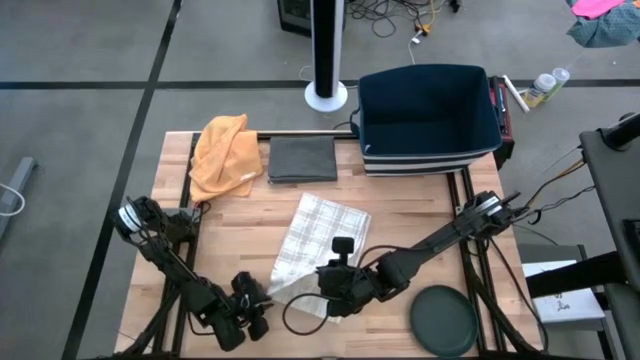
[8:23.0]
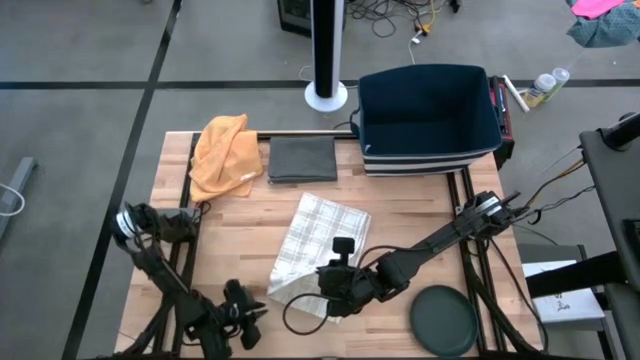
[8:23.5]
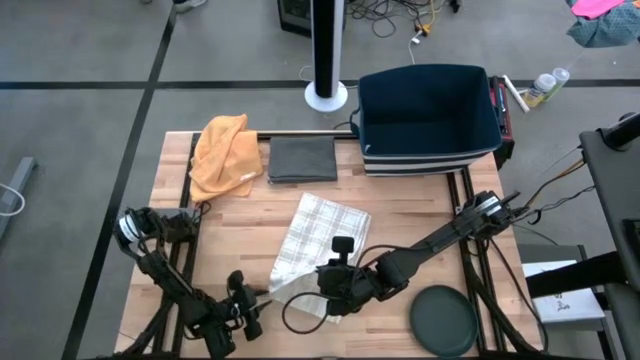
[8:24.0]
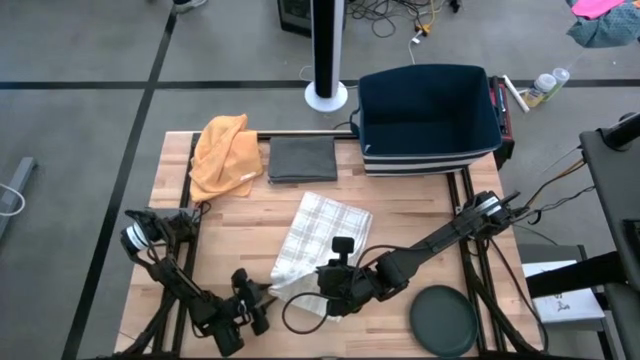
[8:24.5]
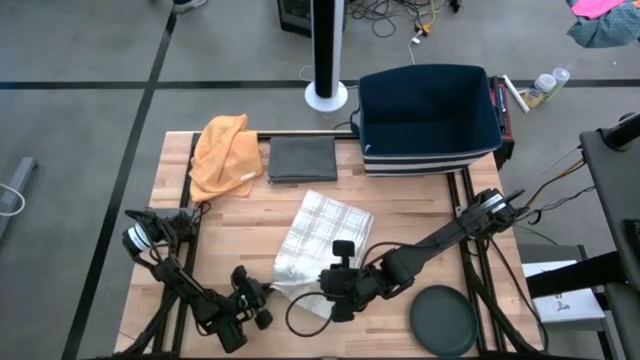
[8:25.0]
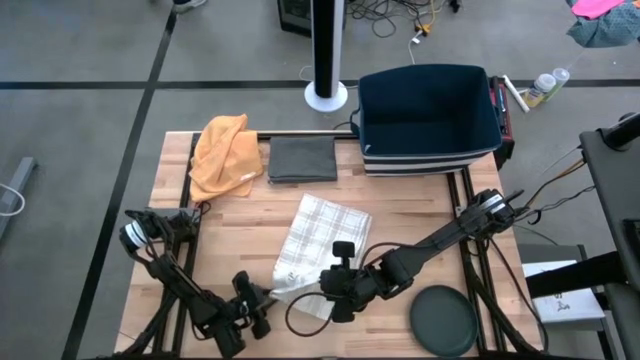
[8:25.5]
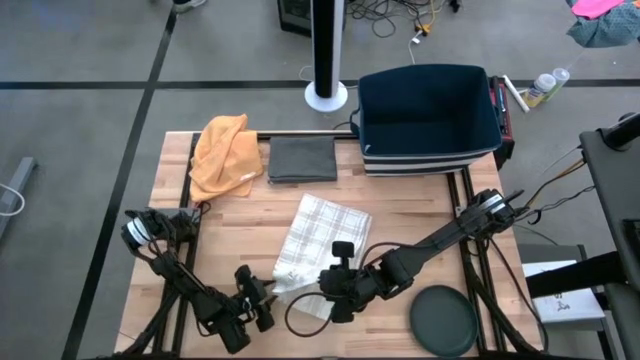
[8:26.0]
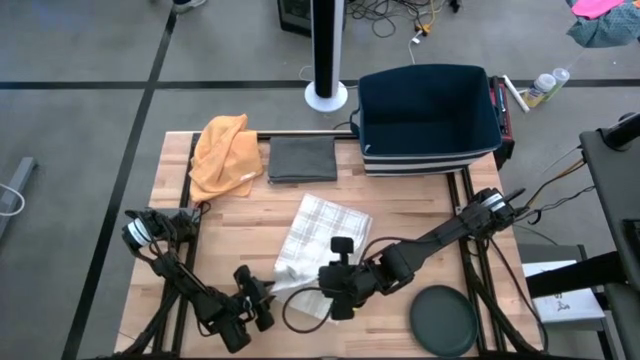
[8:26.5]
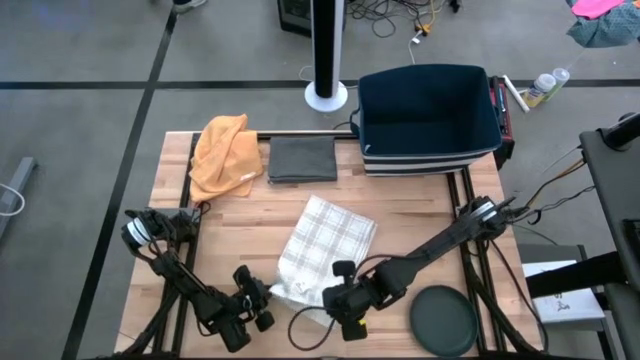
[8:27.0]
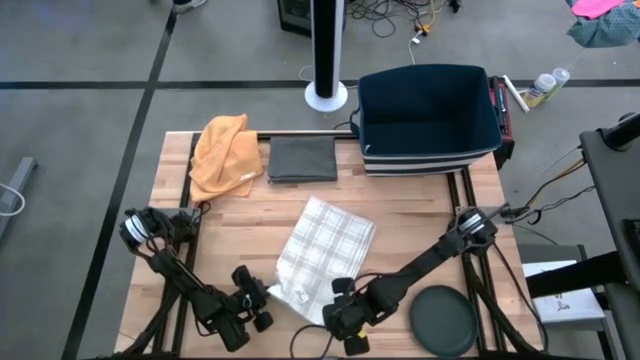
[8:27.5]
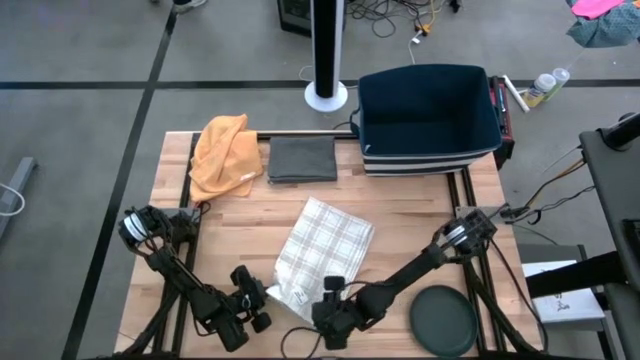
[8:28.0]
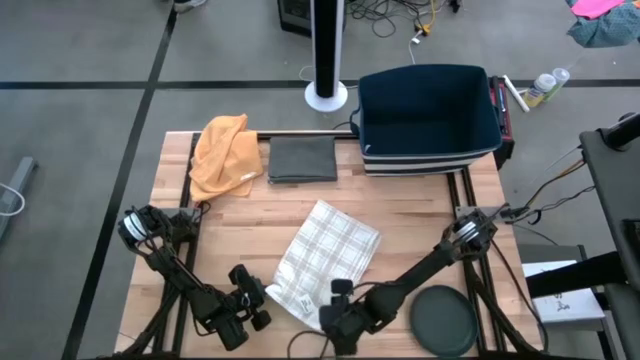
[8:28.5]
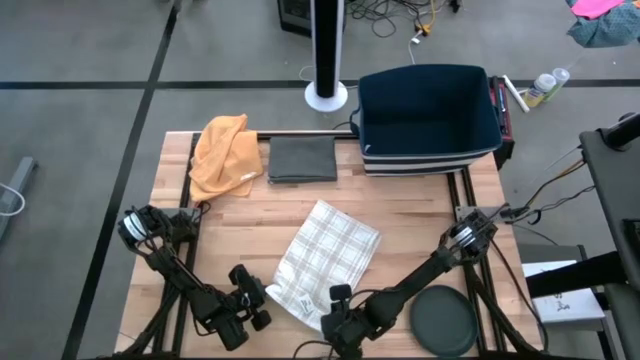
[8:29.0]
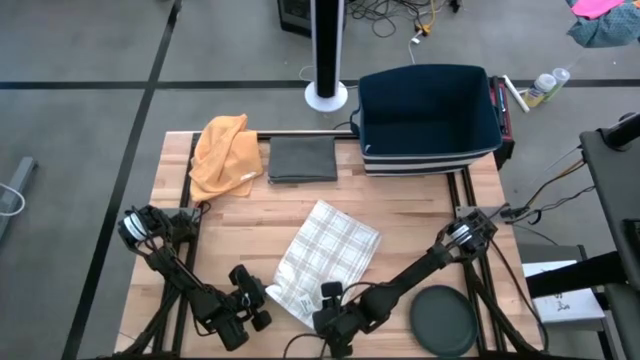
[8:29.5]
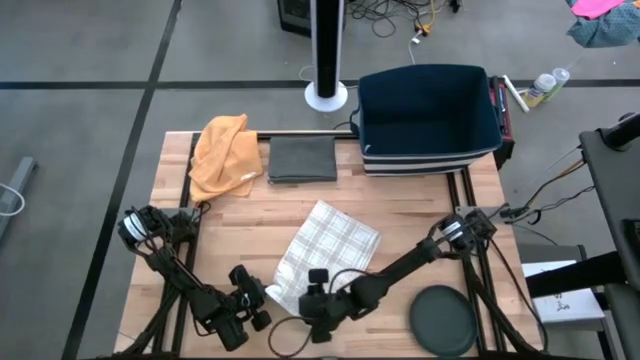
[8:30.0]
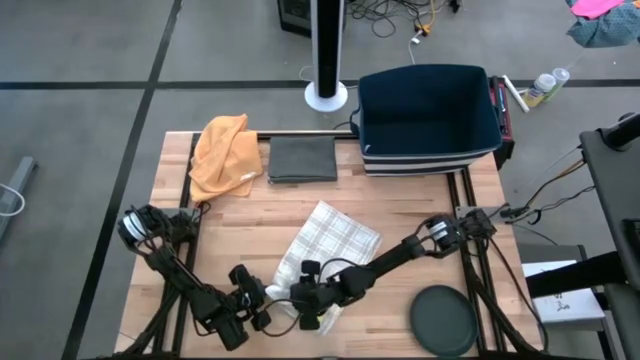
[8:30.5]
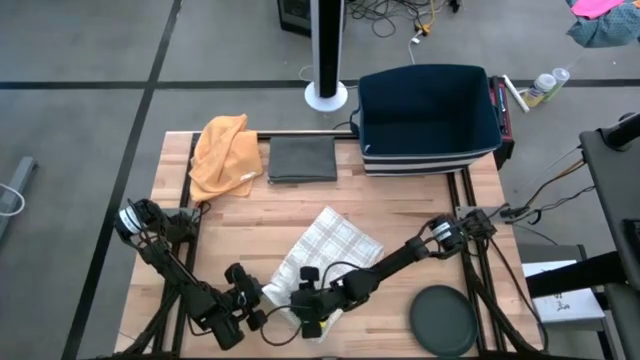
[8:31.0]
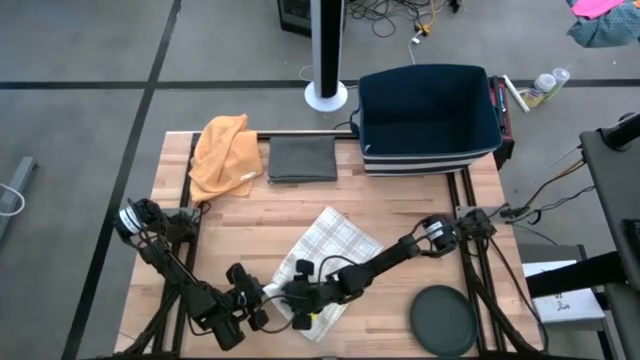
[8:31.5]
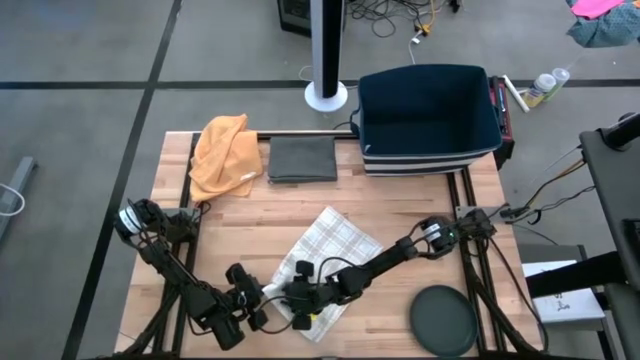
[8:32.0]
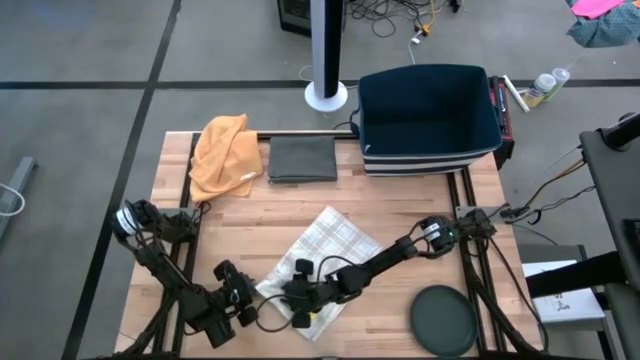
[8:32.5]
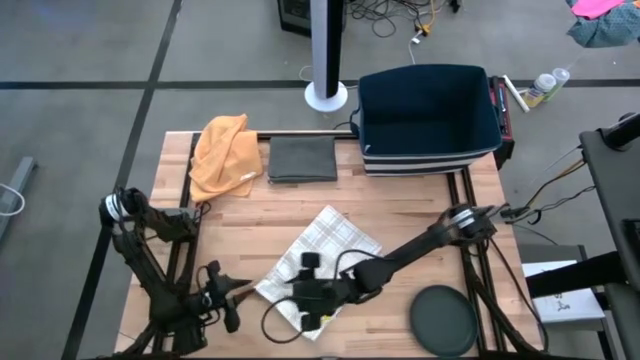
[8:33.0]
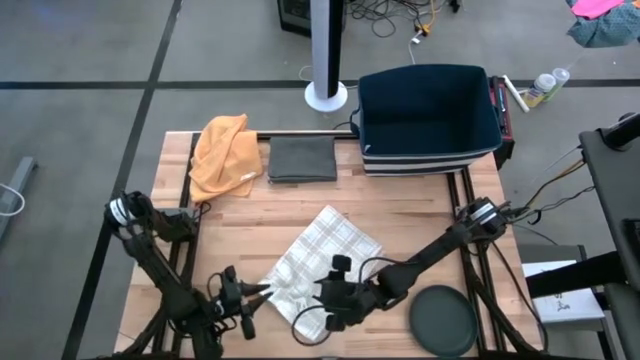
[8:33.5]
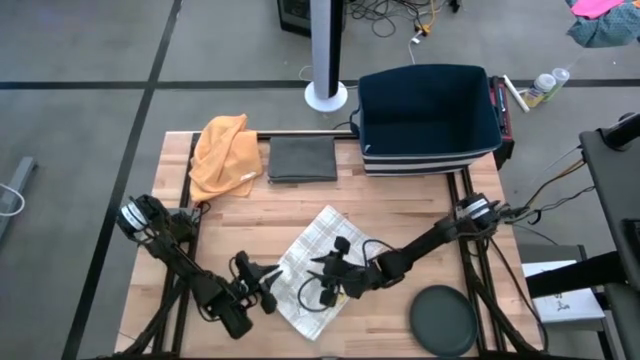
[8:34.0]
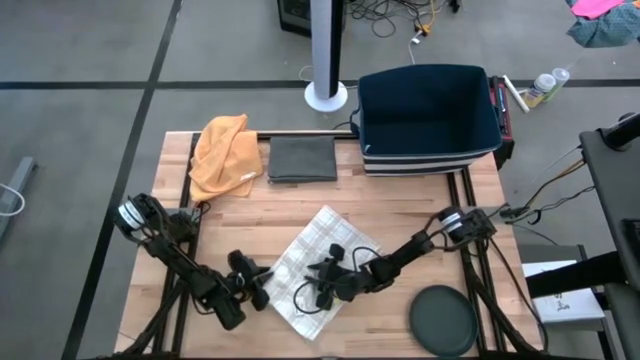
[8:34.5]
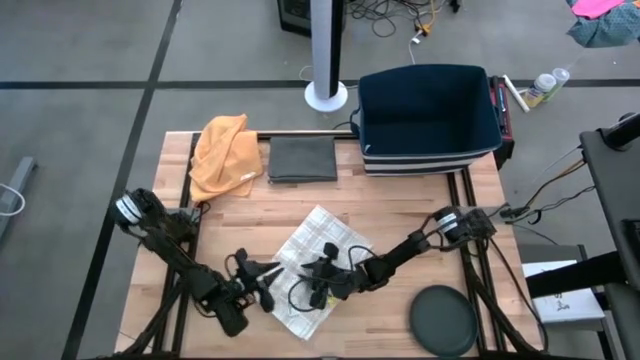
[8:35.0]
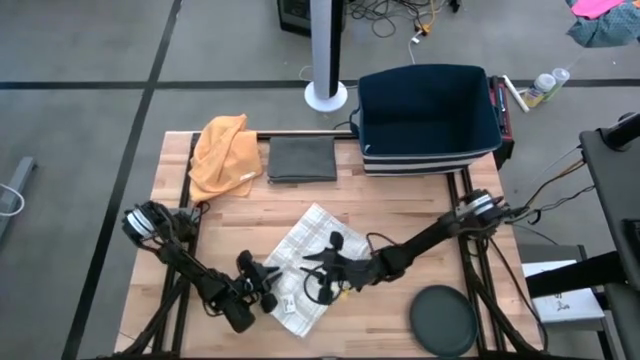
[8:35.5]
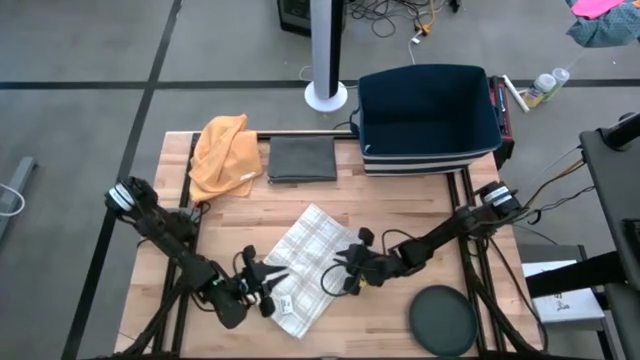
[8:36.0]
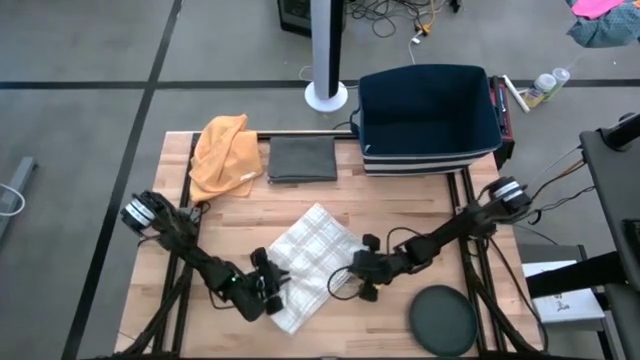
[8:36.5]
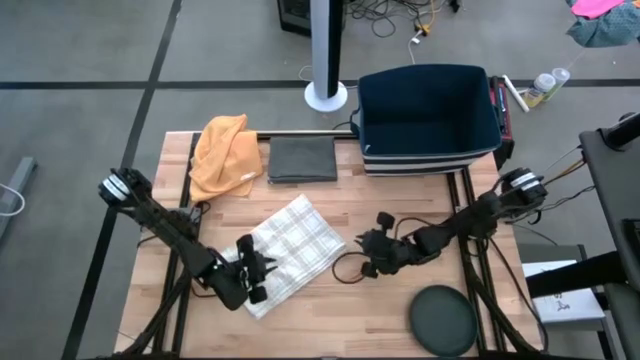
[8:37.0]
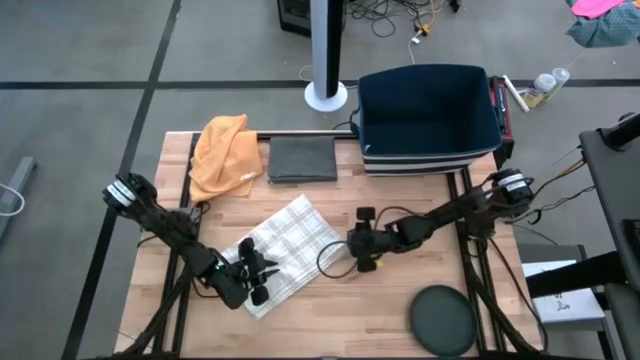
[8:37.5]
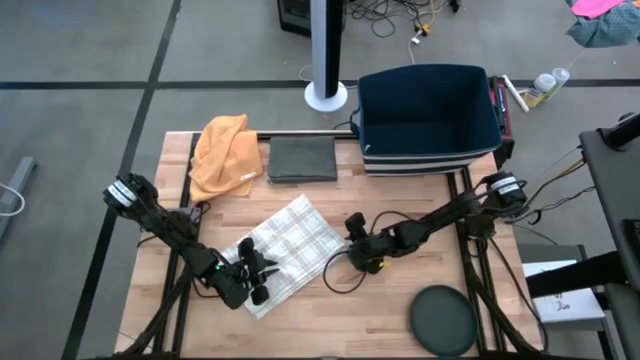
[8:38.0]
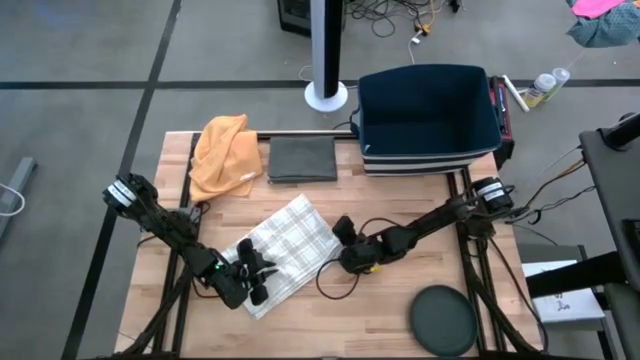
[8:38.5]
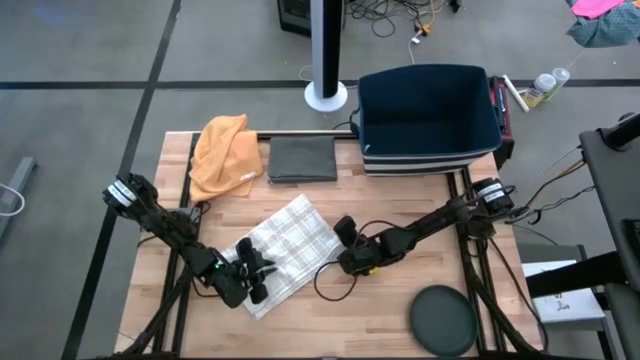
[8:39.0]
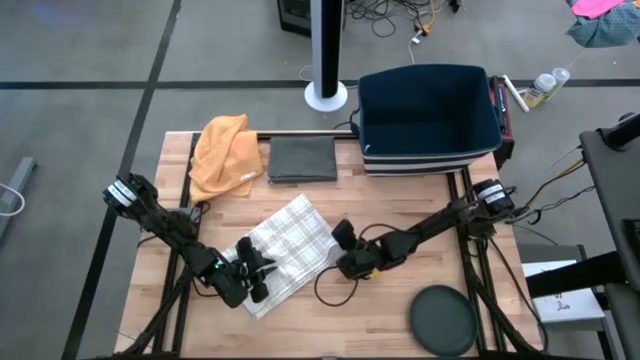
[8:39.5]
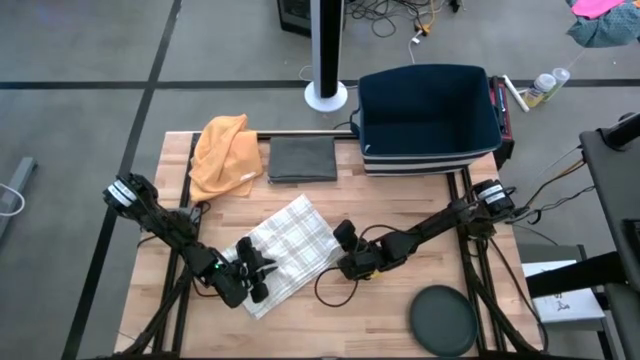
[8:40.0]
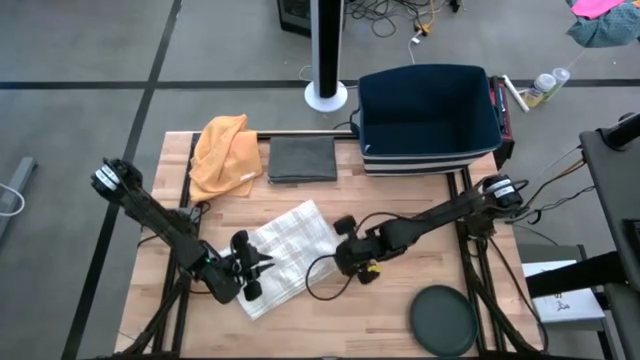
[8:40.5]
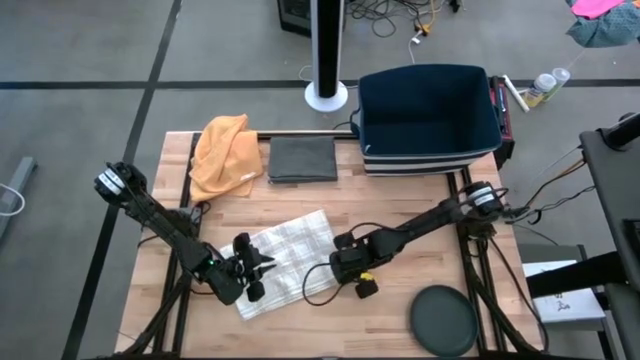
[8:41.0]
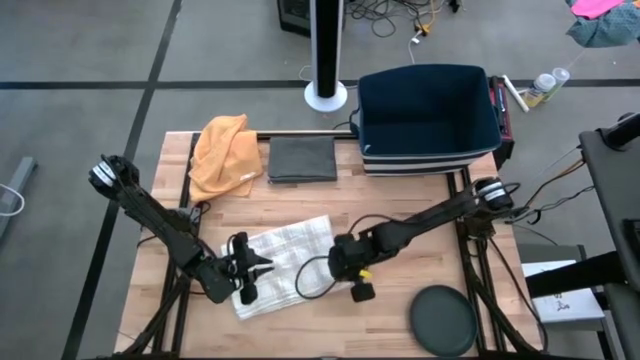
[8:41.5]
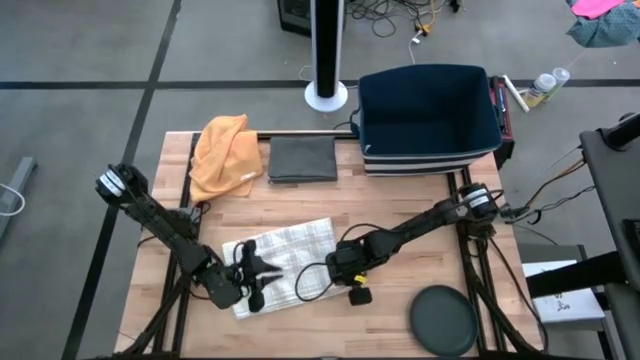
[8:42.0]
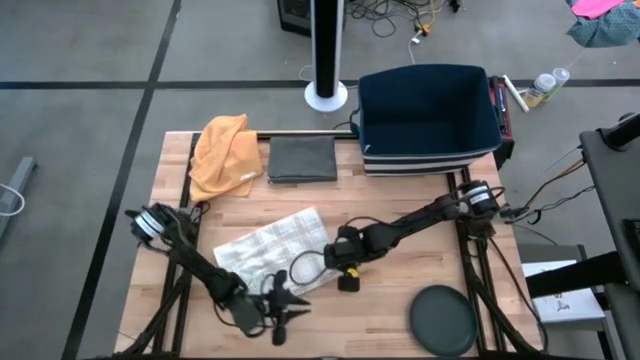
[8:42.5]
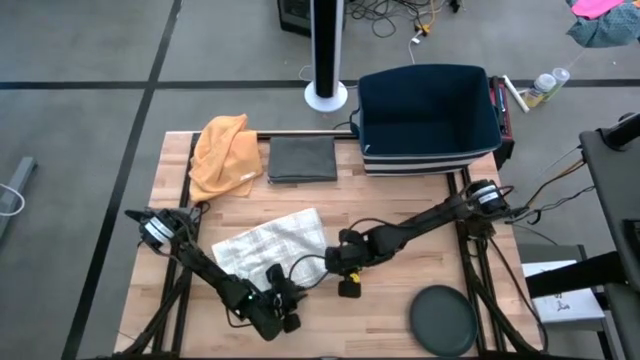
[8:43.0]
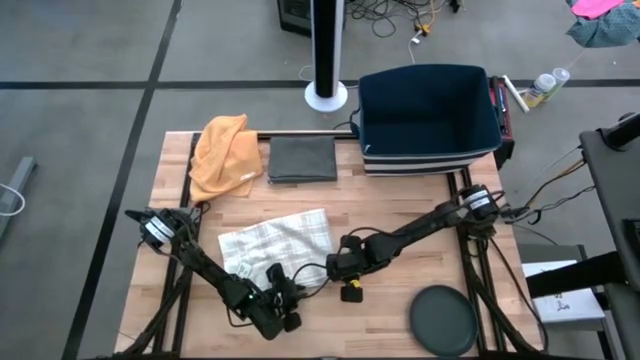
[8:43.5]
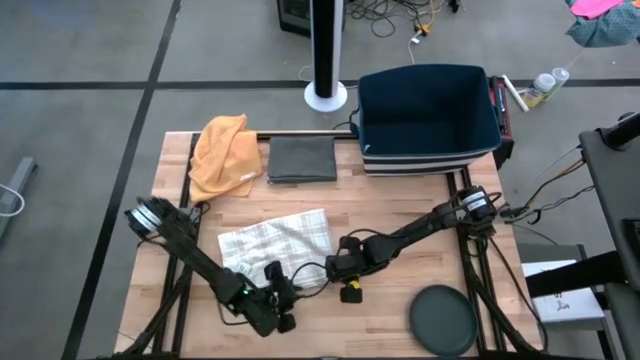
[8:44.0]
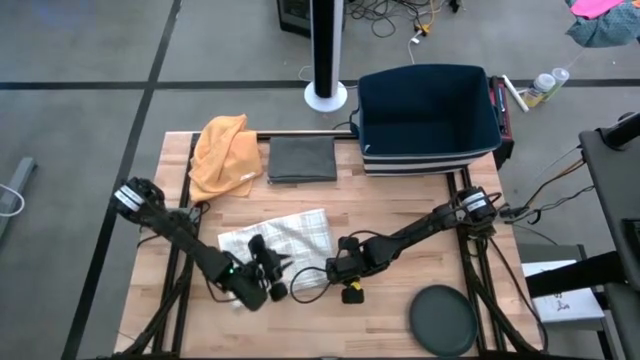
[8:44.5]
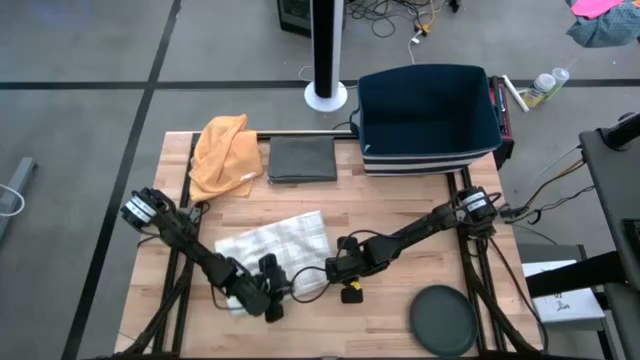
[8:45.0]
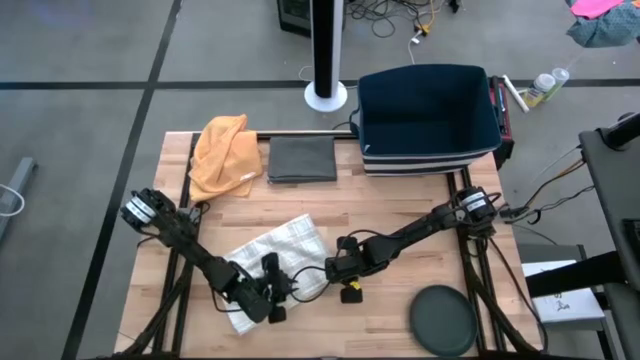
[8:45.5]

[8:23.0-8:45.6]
Task: Fold kitchen towel into neat rectangle
Fold the white patterned towel
